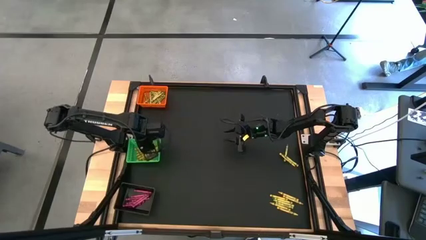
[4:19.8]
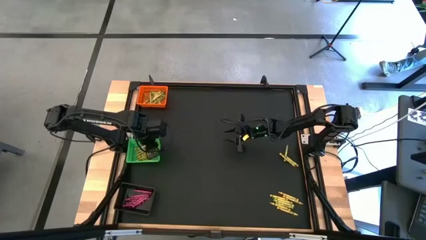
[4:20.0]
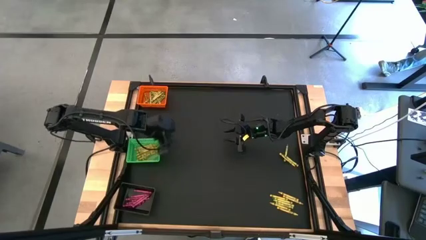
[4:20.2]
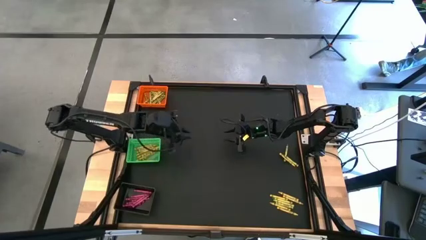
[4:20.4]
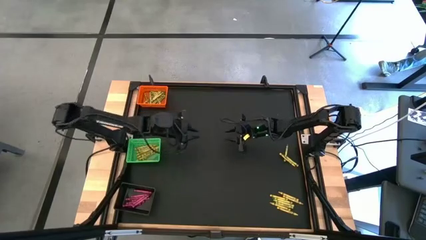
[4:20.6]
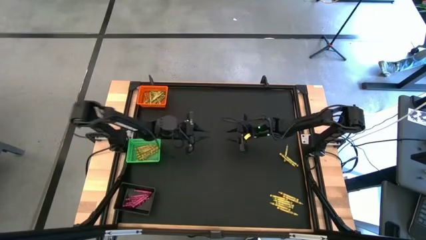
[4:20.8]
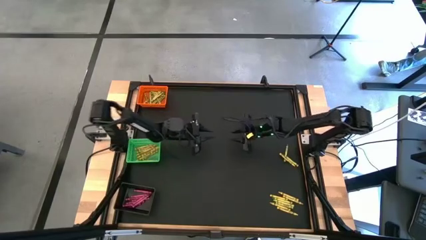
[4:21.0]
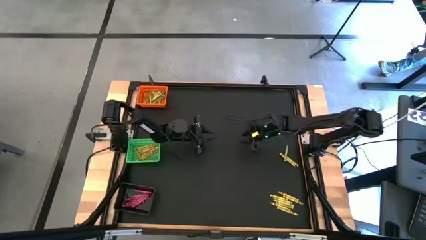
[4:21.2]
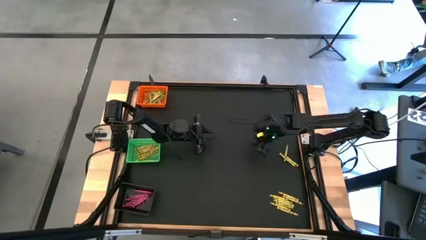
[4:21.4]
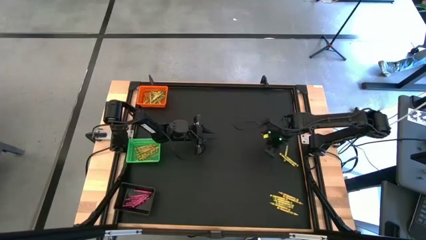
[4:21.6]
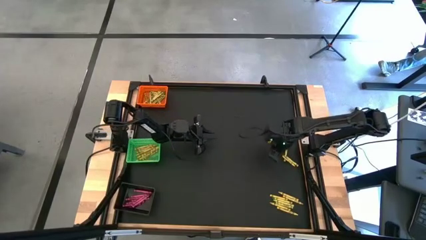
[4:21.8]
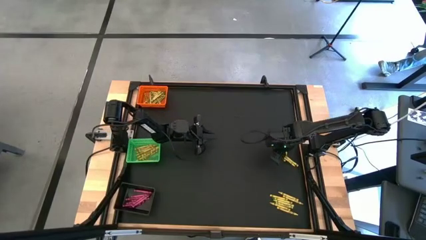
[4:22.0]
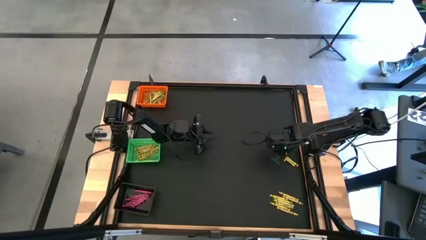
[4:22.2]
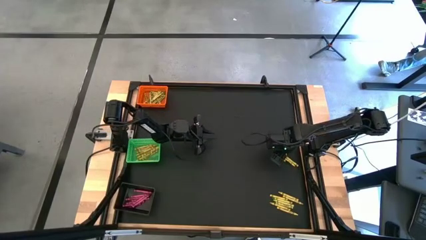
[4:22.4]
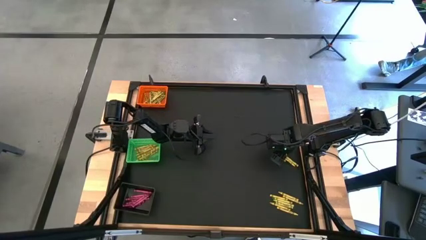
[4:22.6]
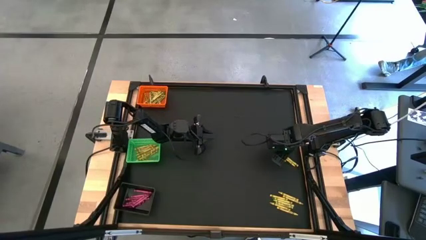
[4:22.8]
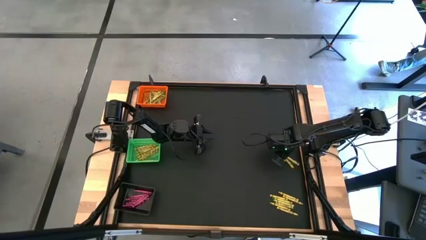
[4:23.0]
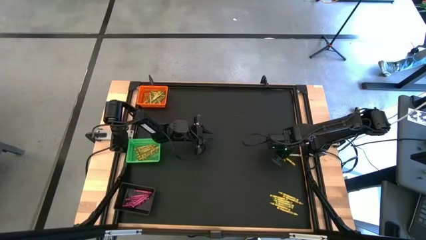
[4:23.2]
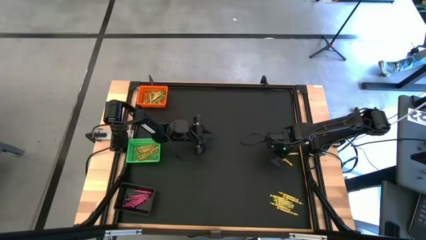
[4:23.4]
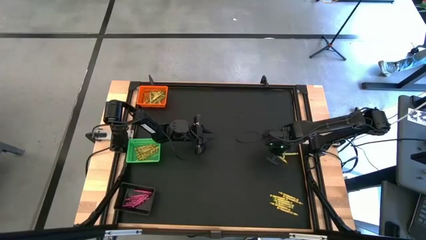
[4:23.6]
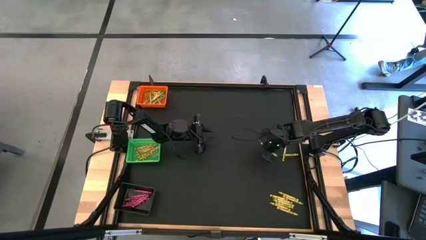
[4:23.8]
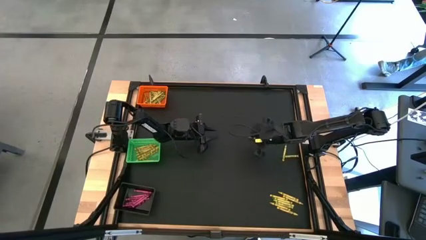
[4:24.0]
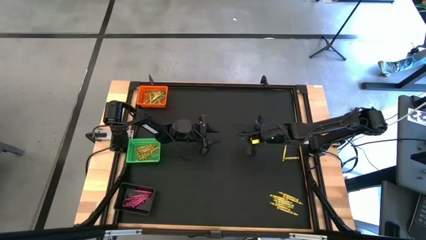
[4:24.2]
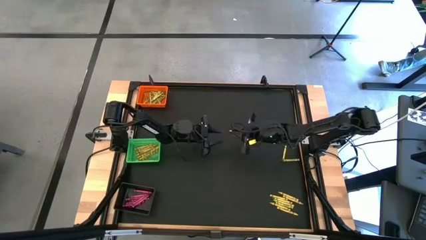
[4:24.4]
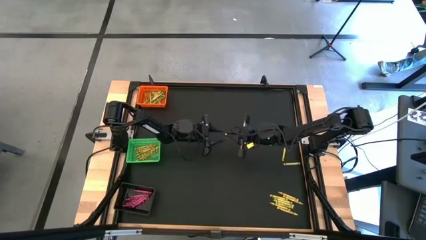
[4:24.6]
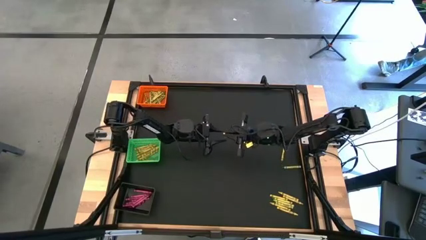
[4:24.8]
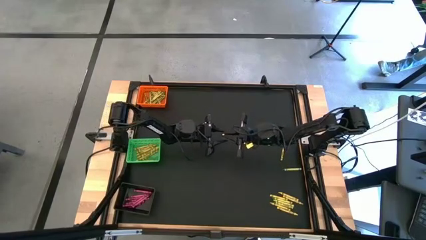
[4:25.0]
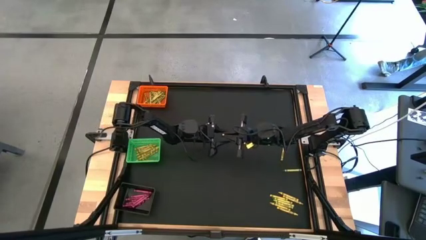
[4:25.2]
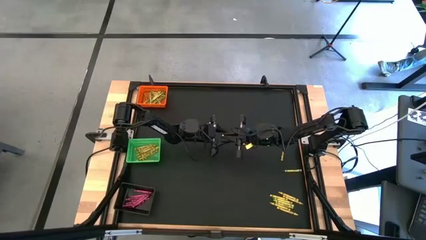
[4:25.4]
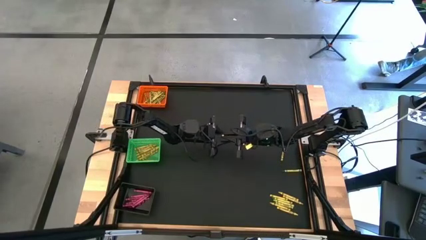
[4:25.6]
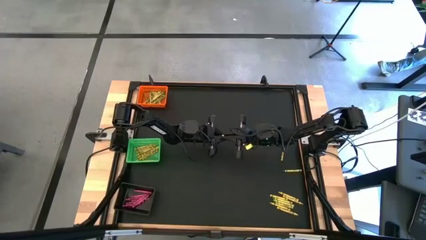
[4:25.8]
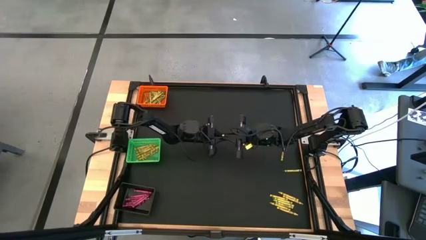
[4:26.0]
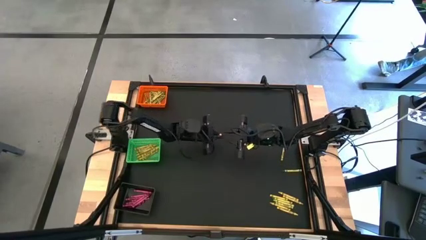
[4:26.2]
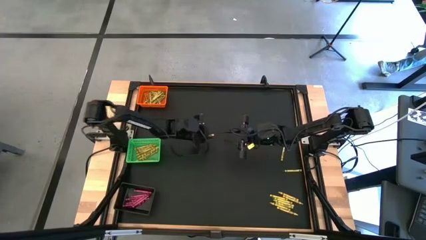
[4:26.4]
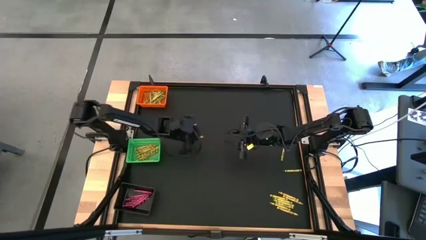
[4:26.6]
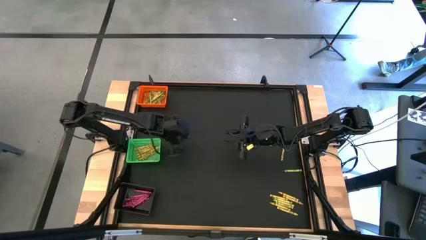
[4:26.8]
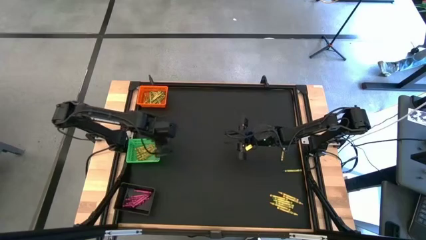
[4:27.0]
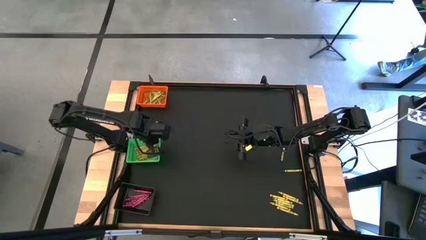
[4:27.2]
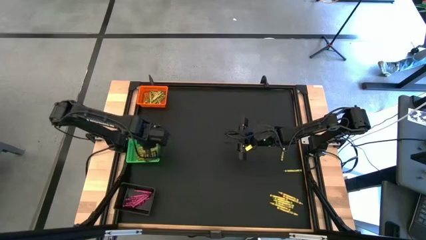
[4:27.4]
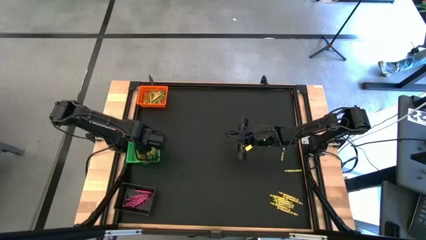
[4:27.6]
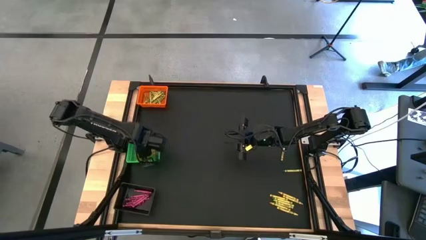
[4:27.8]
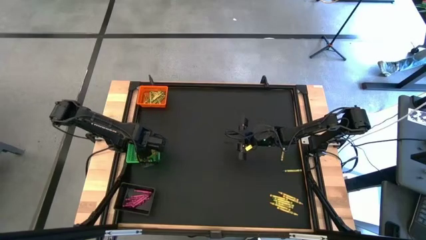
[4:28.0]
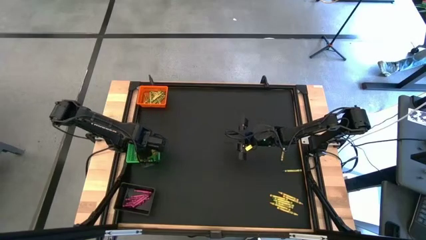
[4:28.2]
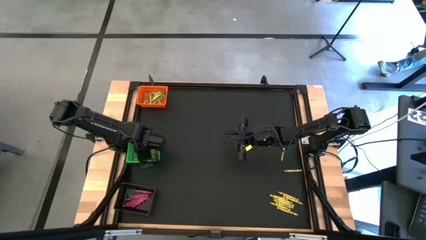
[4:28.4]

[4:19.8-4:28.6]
Task: Sort crayons
Put the yellow crayon into the green bin

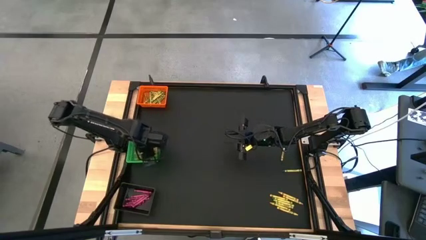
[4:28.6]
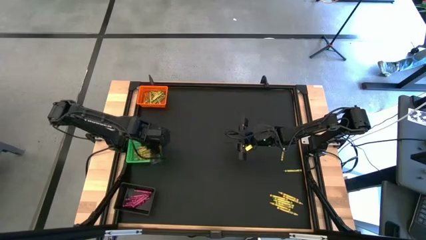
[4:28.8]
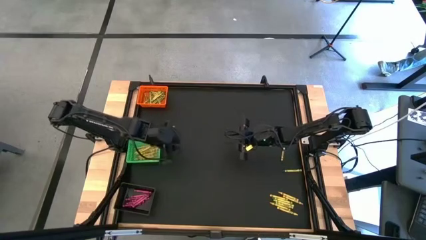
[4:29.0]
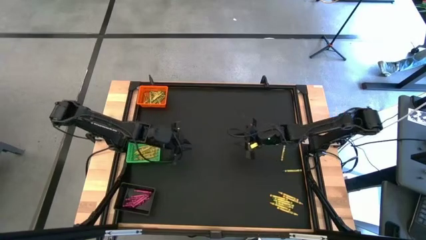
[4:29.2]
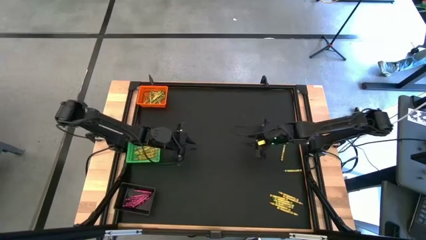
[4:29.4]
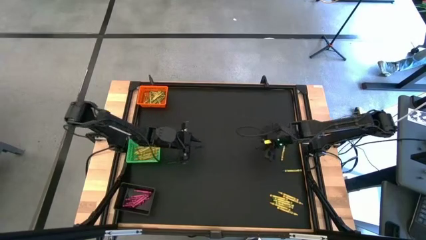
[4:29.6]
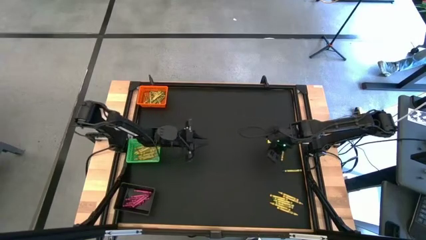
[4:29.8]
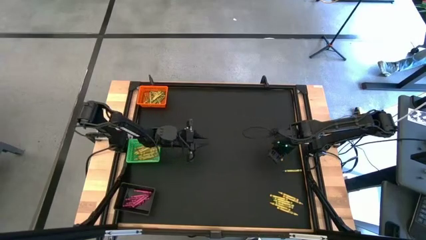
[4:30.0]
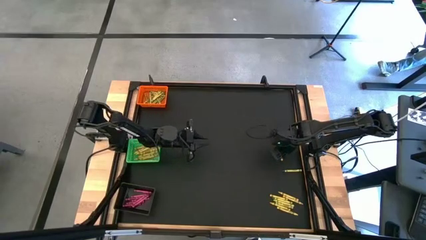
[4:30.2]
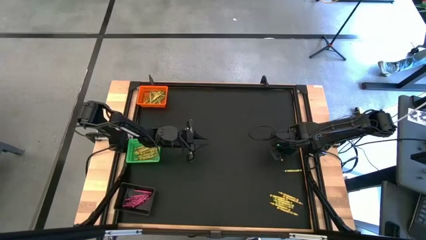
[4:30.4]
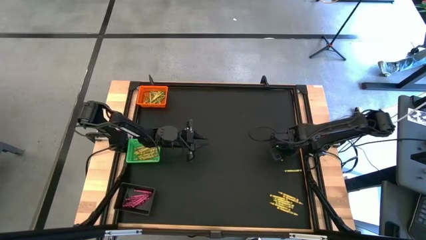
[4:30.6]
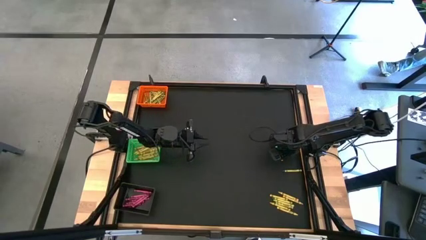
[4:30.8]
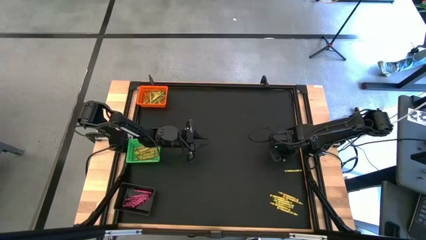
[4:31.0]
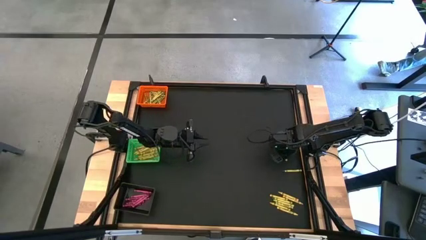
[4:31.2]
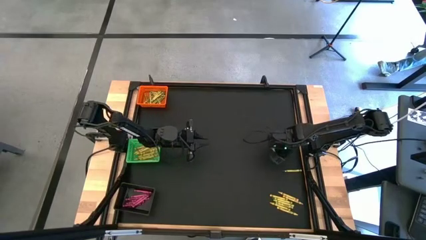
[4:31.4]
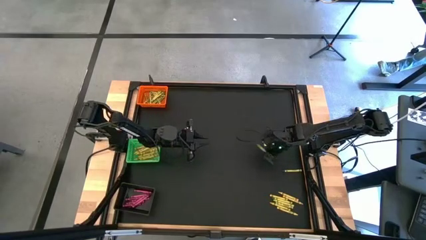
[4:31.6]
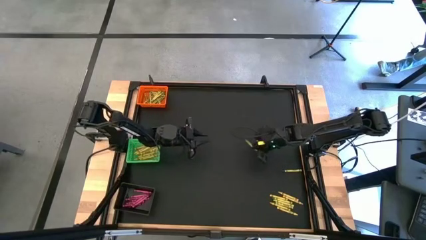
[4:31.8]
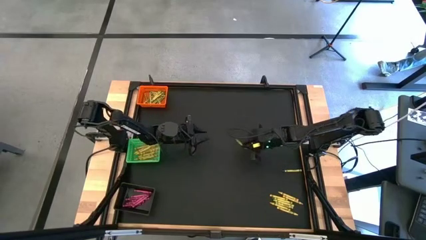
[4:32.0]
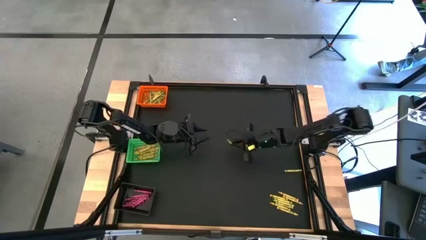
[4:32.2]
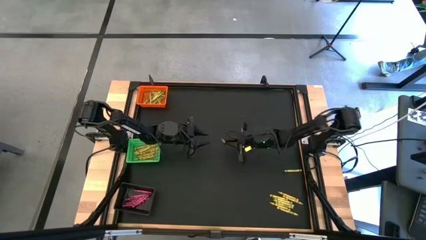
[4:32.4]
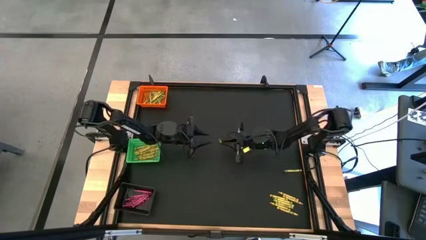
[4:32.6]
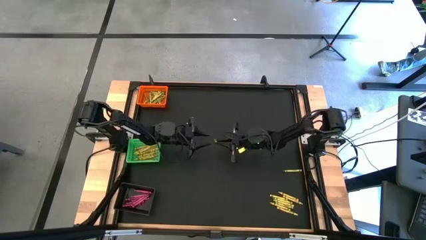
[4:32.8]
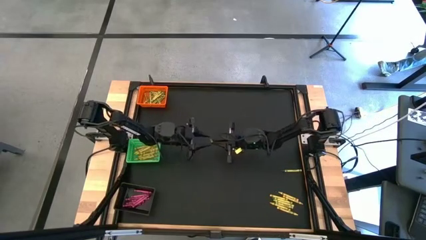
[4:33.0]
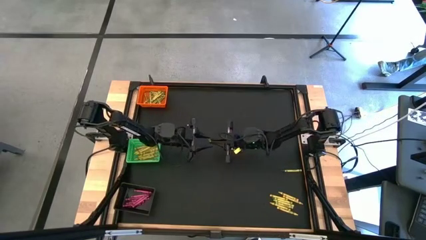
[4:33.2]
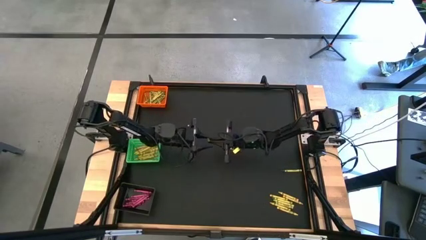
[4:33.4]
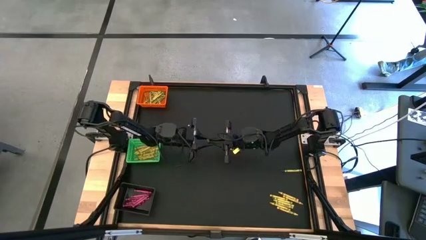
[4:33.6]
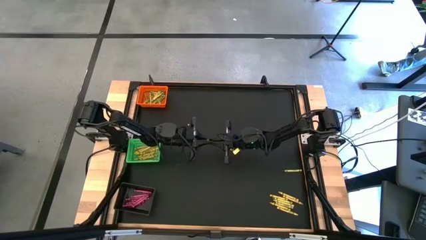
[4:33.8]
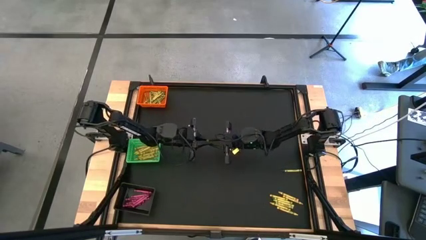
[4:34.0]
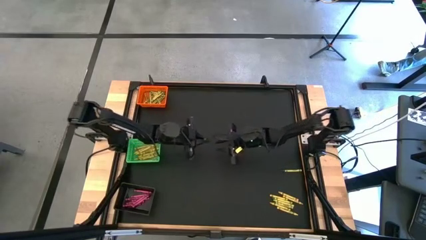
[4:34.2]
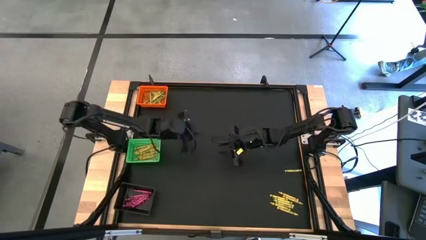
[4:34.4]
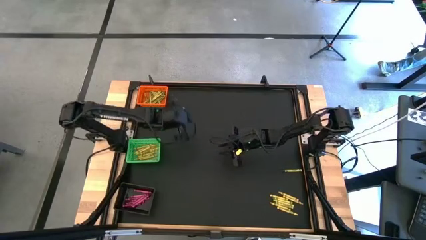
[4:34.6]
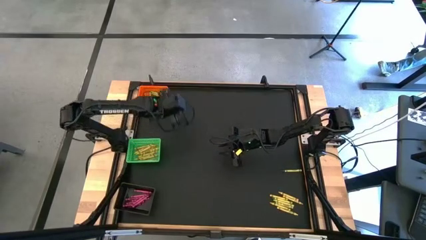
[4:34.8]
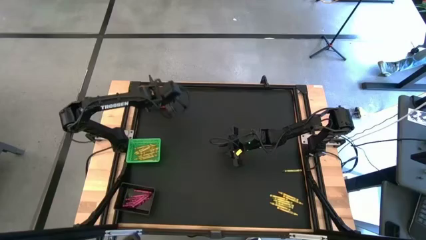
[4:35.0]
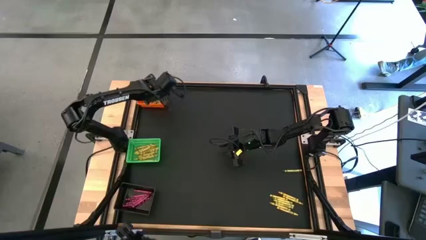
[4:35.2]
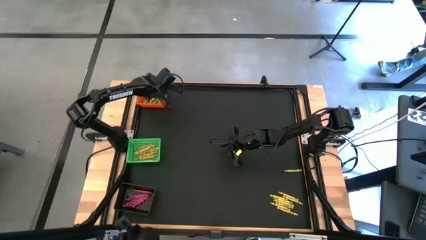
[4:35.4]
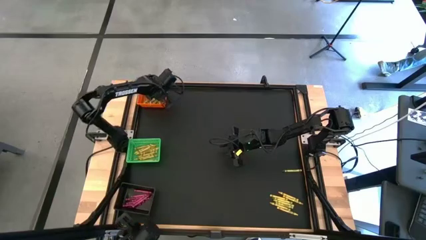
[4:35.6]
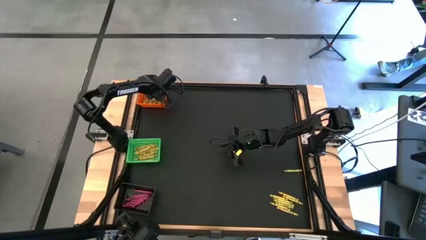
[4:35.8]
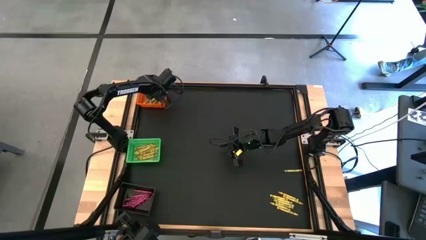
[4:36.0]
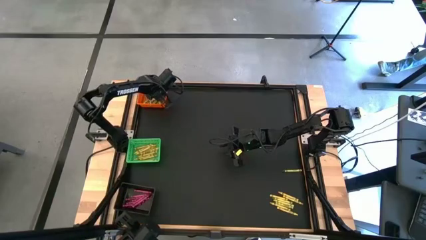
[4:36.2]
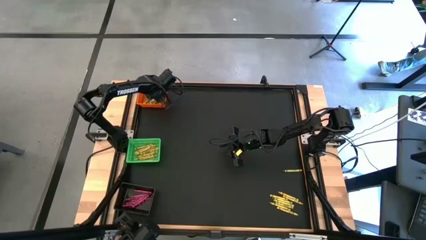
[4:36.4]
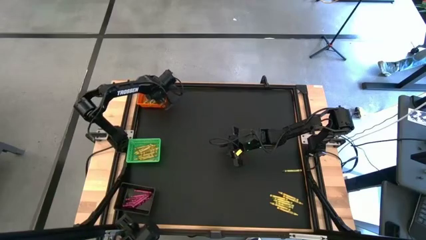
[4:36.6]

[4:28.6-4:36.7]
Put the green crayon into the orange bin
